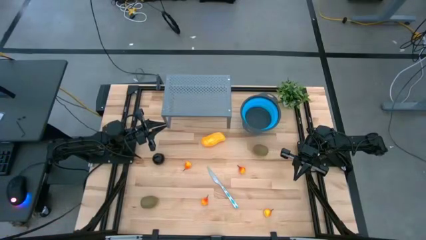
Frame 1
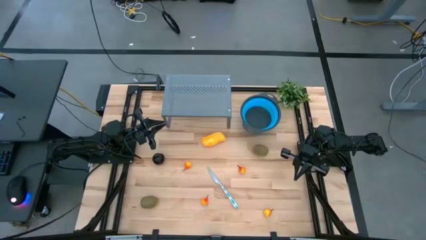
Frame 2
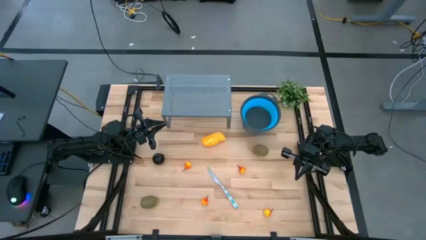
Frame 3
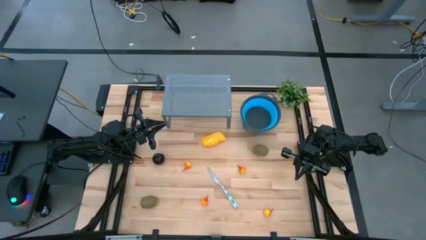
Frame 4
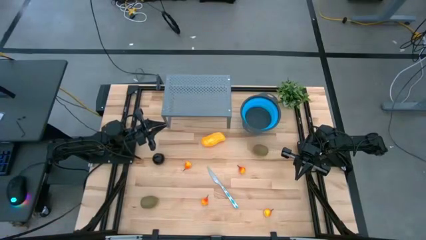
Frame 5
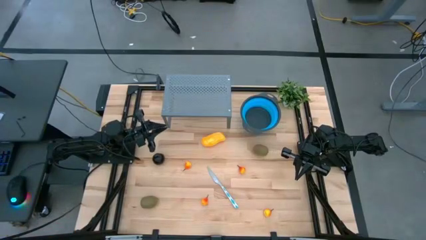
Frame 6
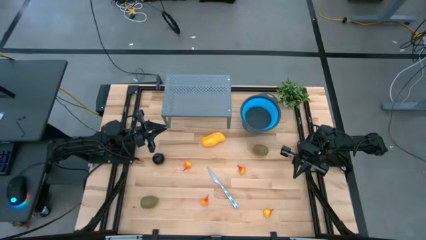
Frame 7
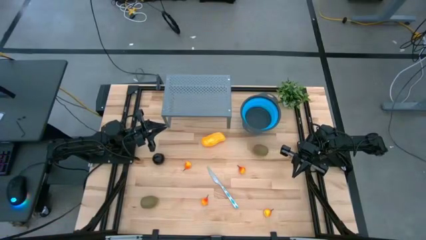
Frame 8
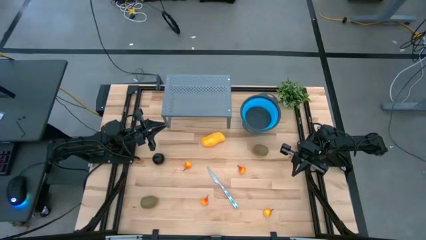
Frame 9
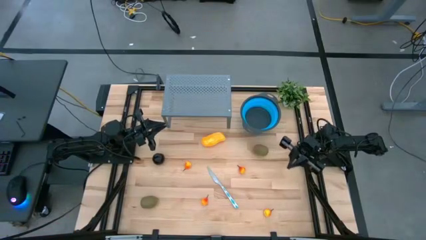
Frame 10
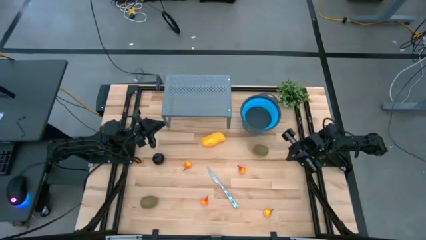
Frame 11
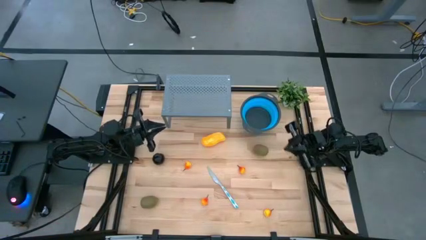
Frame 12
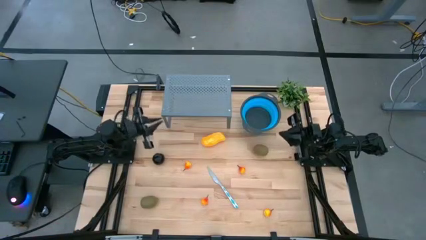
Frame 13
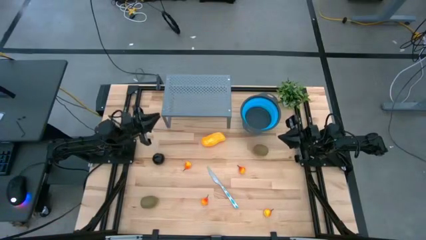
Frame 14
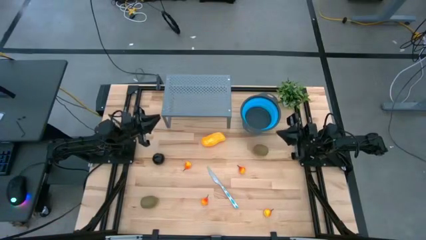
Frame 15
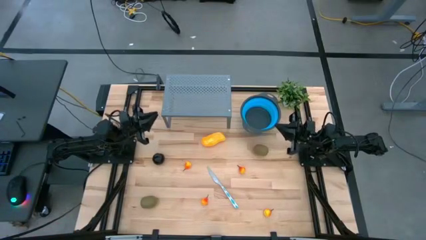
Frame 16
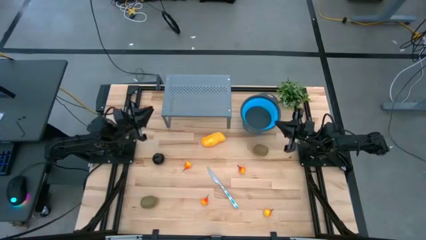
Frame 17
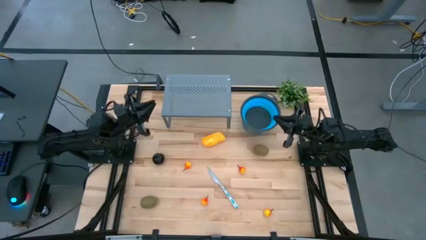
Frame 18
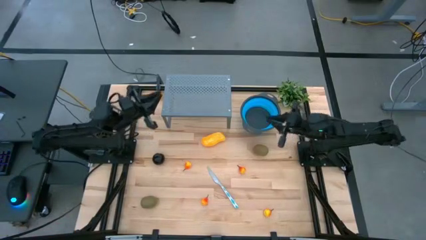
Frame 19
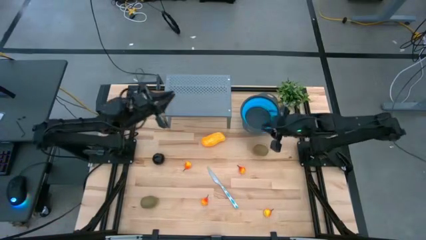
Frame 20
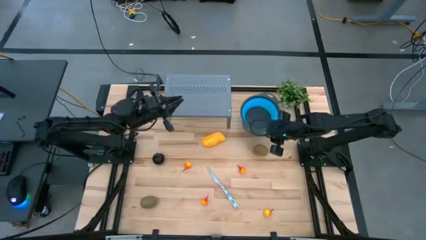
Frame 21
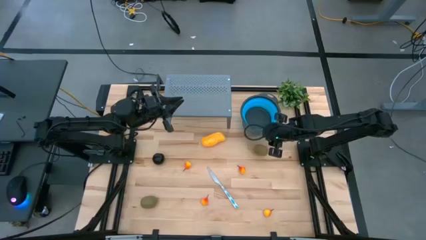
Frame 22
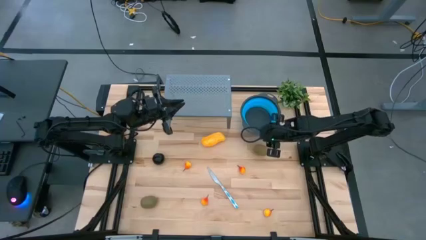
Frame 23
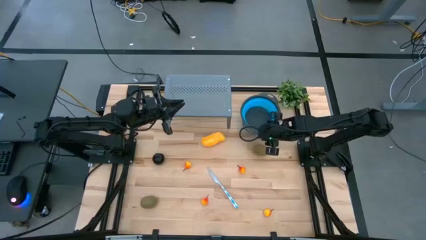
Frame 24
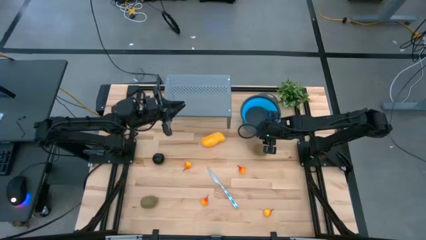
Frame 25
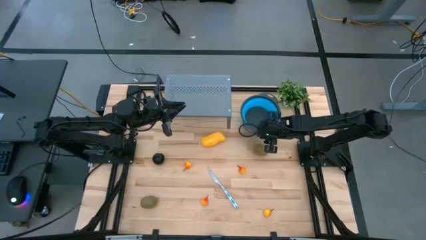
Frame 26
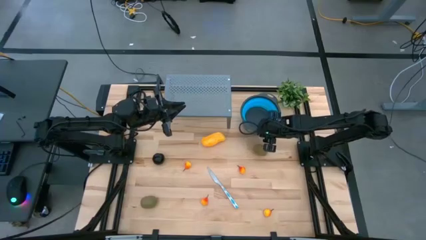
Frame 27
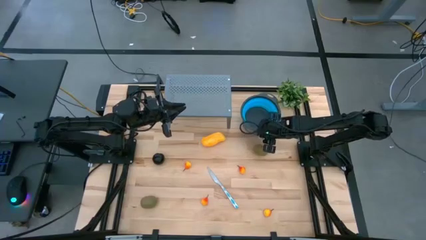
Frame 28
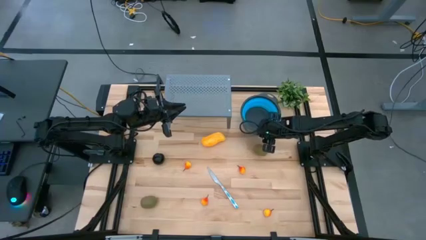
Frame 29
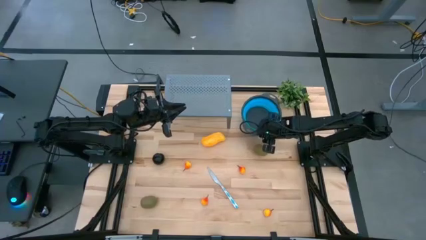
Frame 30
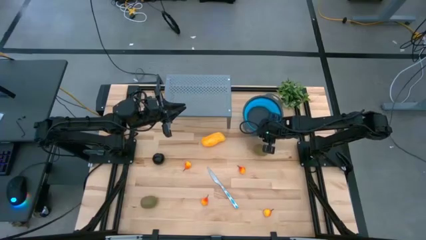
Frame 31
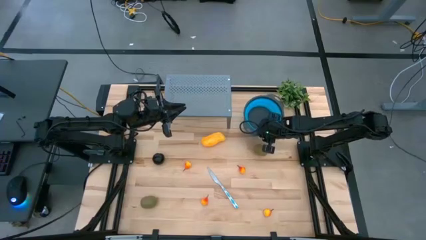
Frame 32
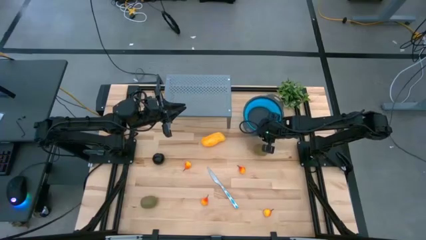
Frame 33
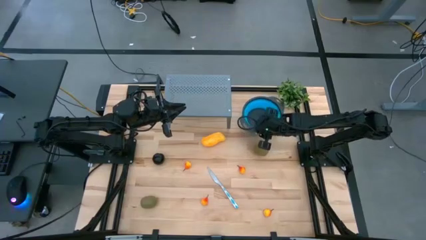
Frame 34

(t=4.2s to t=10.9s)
Task: Pick & Place Fruit
Put the blue strainer bowl on the shelf

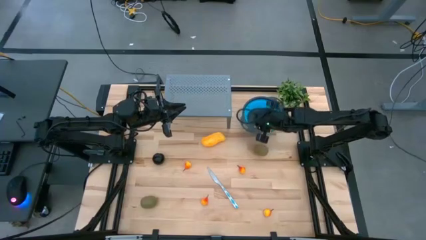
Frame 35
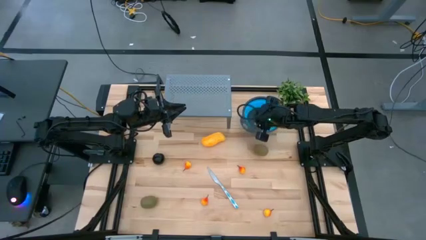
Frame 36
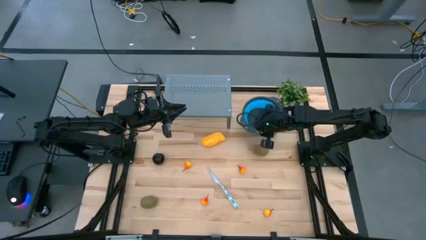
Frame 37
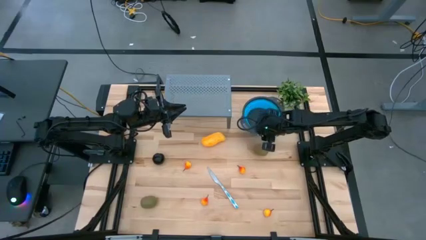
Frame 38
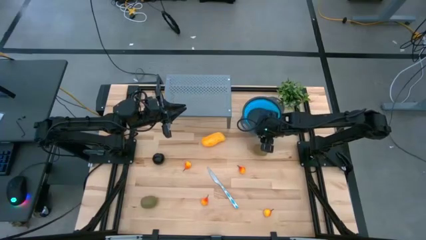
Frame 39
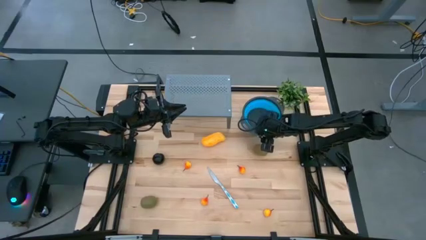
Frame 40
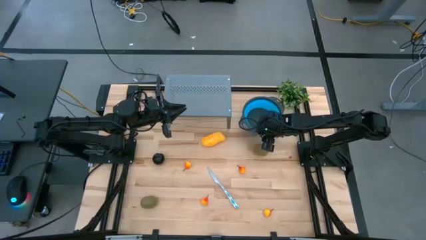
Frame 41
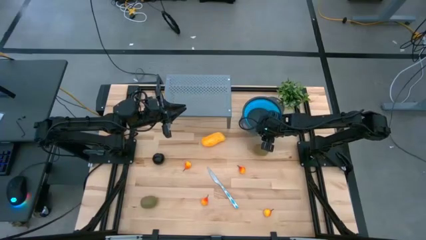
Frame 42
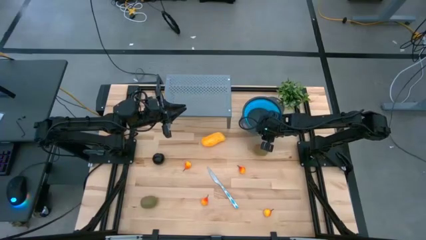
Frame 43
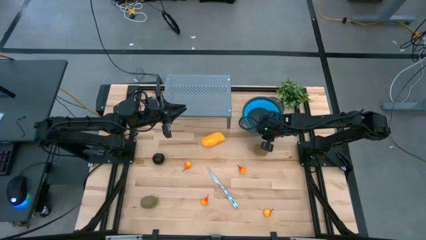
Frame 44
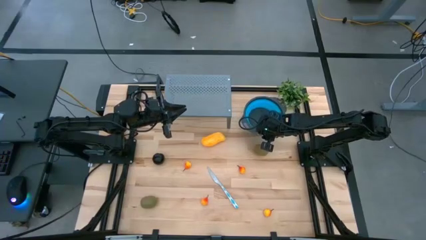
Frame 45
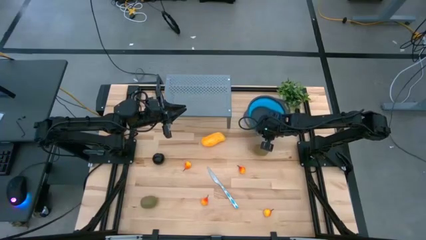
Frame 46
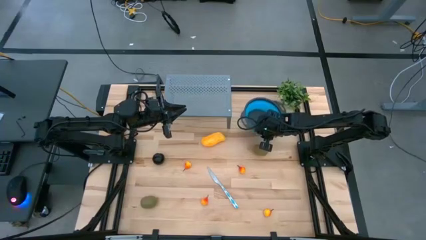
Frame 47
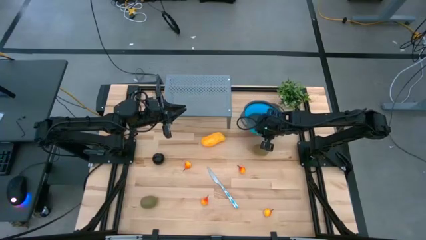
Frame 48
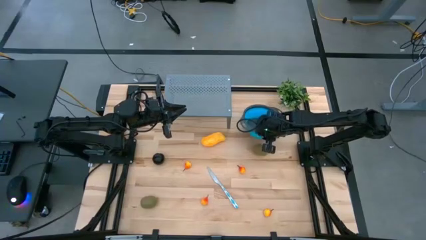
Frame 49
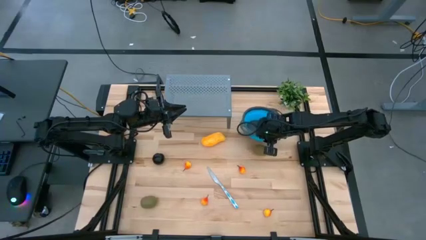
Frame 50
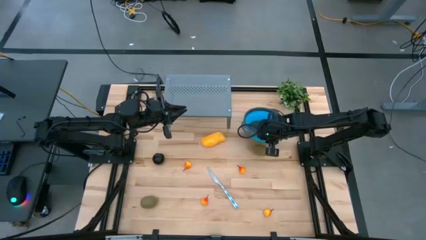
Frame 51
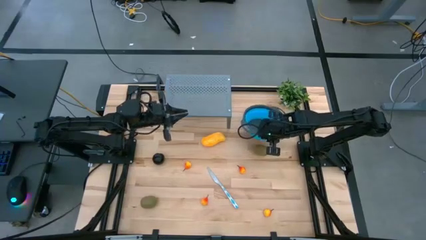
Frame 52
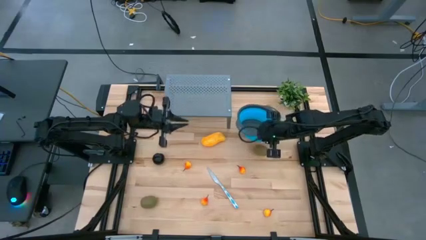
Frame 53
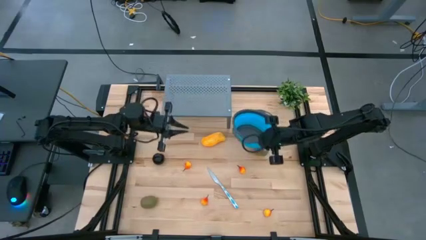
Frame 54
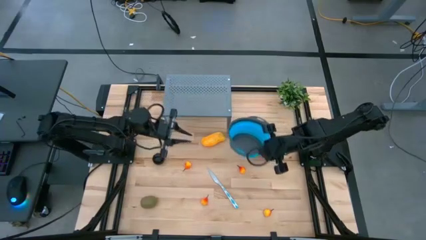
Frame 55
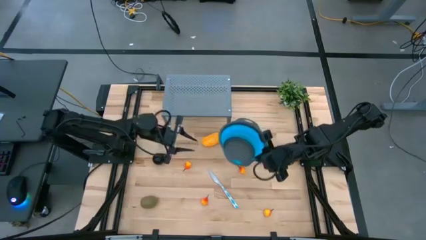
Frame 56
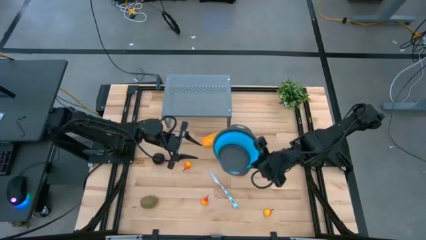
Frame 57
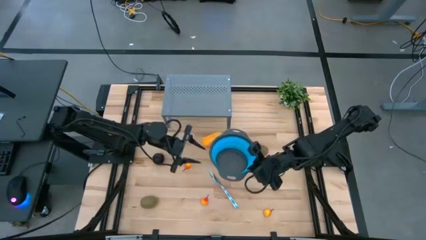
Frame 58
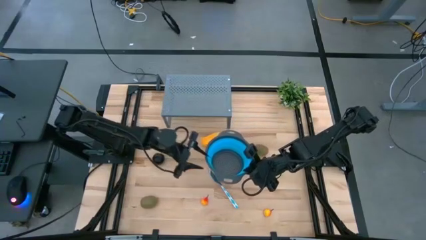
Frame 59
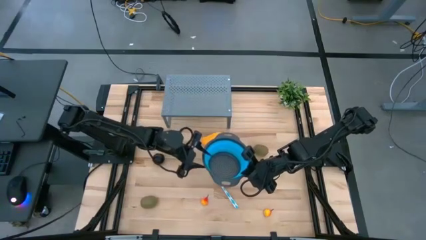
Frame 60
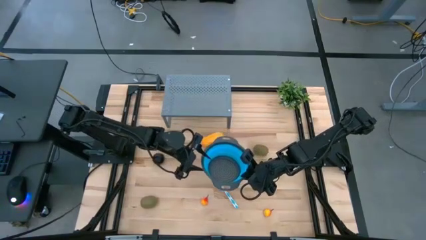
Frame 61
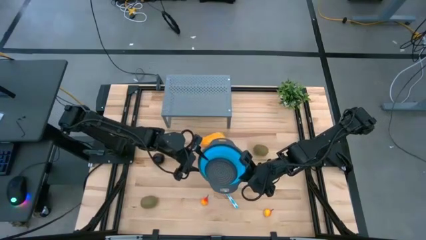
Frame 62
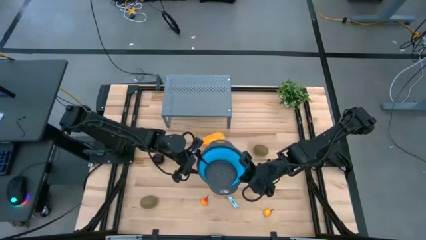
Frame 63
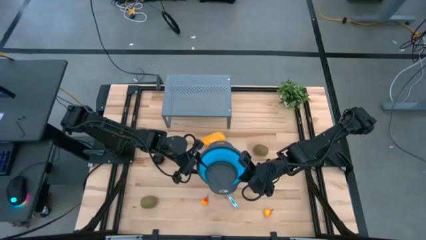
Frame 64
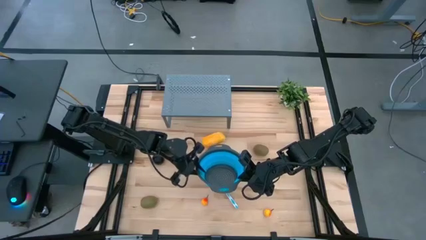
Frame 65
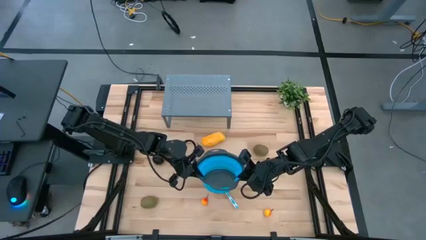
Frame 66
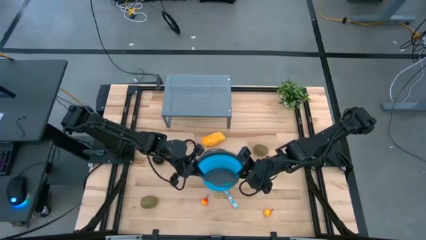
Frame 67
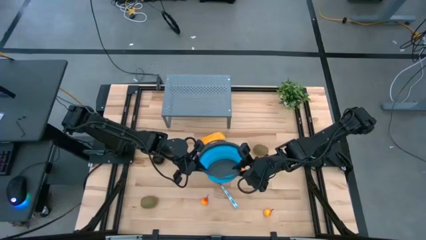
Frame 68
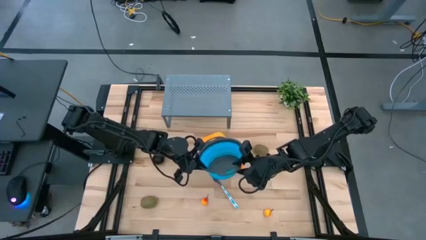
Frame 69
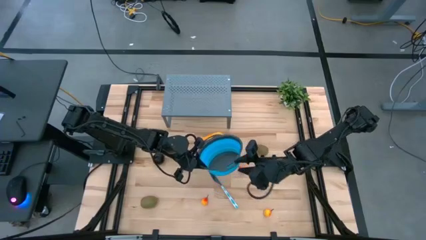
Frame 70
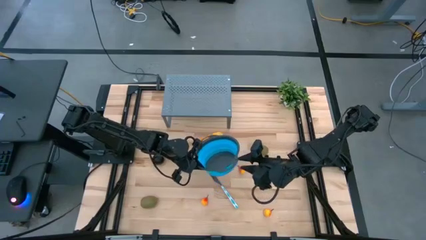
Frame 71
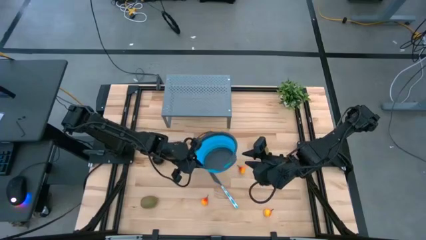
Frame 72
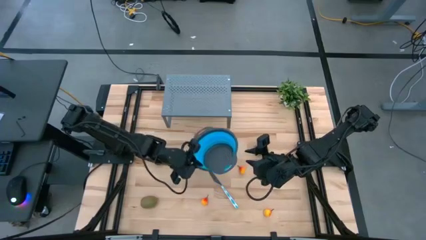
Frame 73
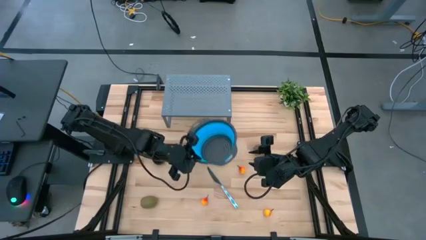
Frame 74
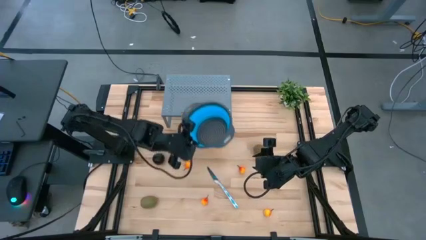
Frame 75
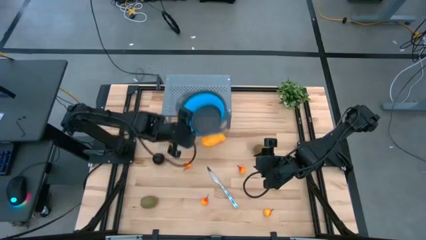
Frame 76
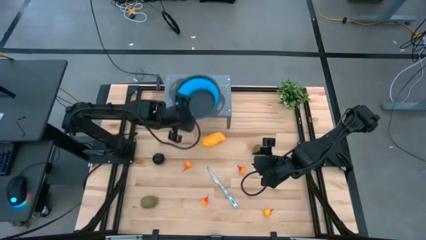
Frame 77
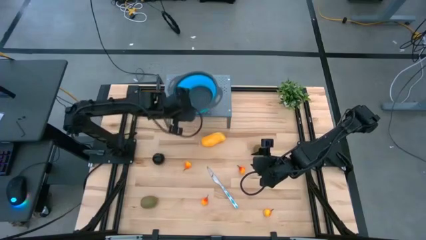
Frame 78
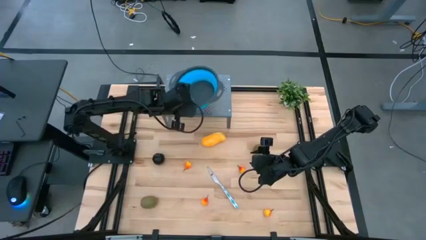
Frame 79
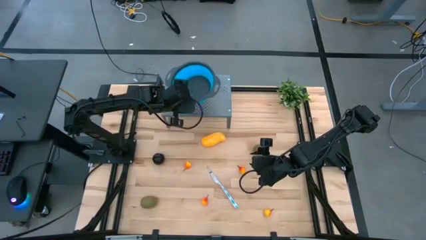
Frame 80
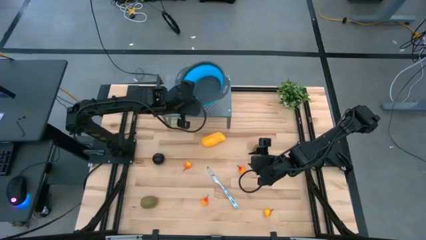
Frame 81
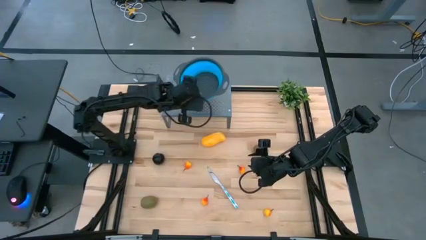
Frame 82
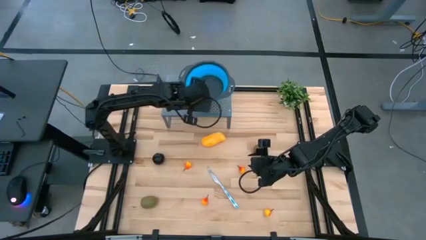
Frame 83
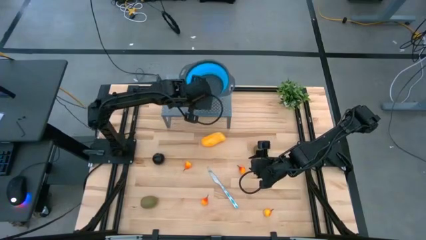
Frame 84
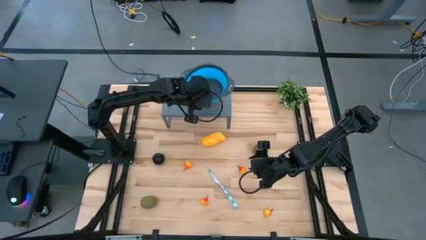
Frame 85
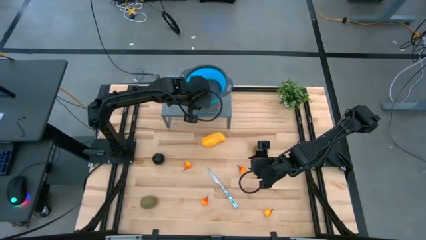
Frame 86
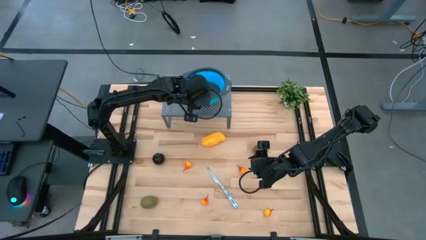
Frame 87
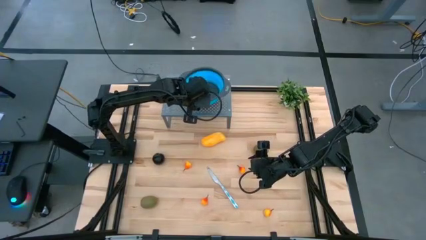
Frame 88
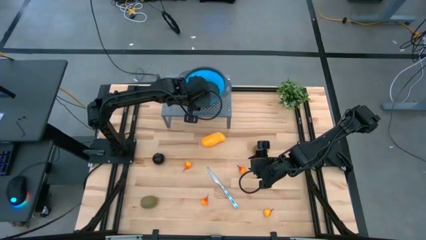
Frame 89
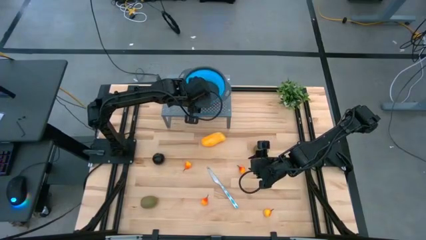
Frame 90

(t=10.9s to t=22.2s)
Put the blue strainer bowl on the shelf
